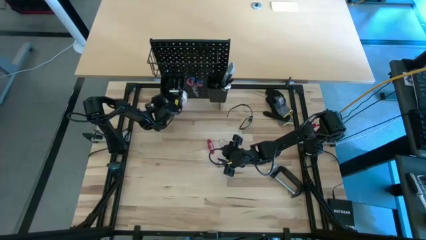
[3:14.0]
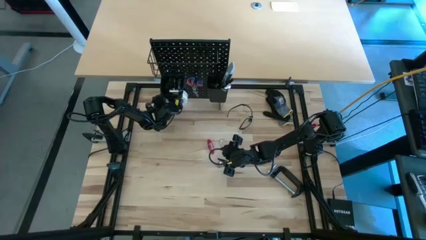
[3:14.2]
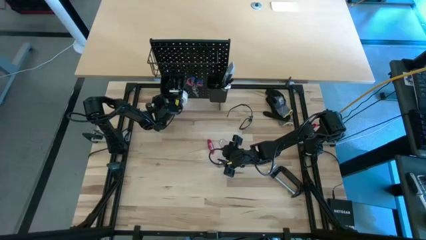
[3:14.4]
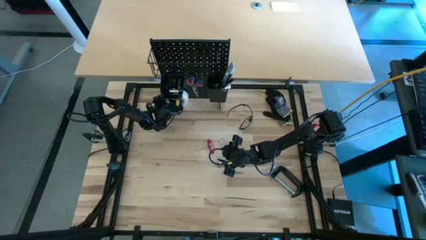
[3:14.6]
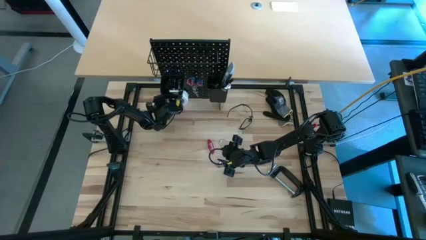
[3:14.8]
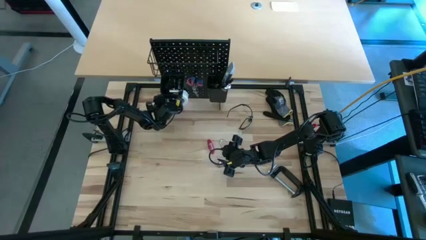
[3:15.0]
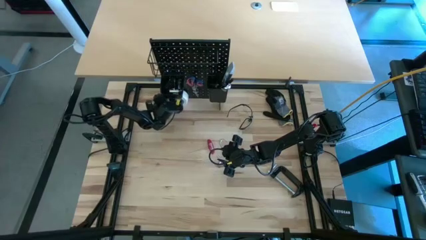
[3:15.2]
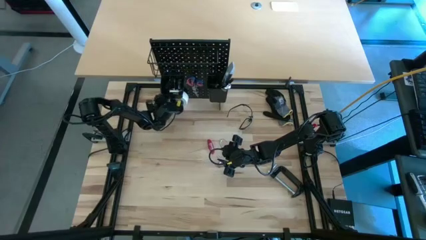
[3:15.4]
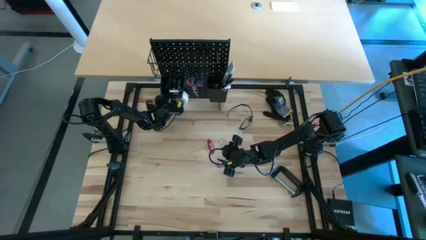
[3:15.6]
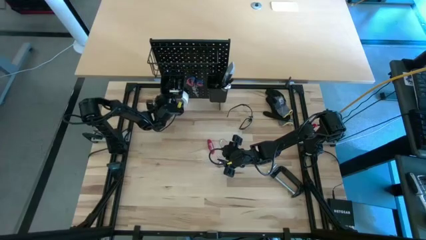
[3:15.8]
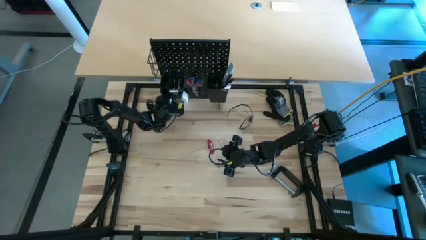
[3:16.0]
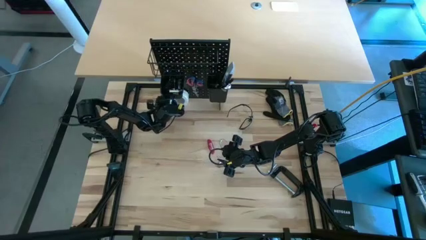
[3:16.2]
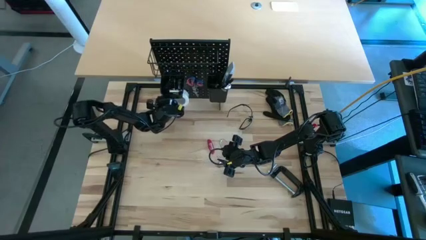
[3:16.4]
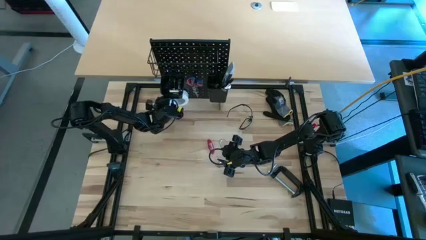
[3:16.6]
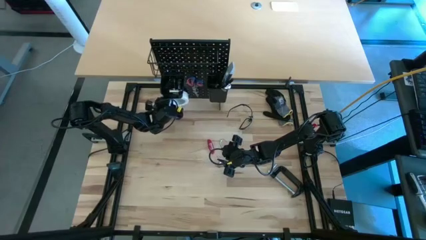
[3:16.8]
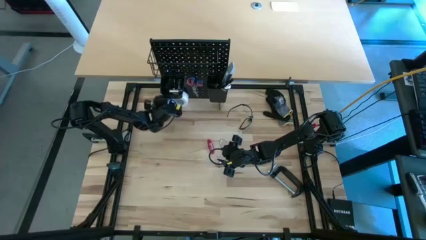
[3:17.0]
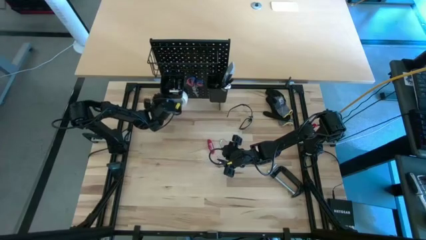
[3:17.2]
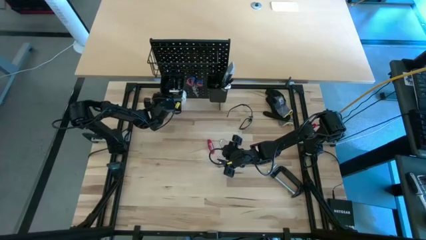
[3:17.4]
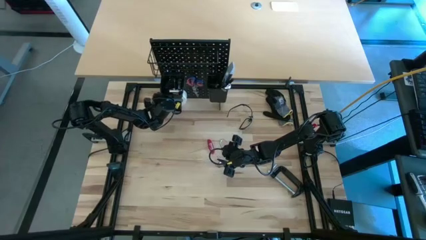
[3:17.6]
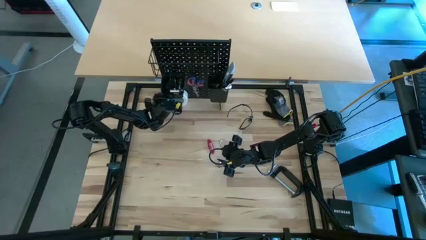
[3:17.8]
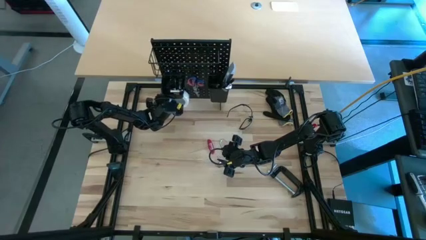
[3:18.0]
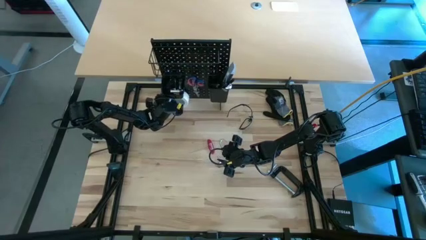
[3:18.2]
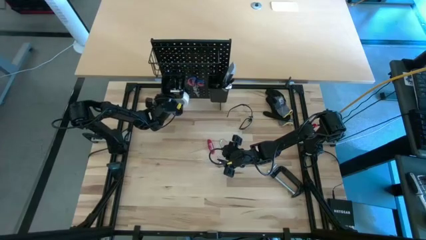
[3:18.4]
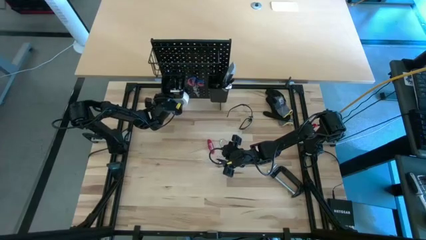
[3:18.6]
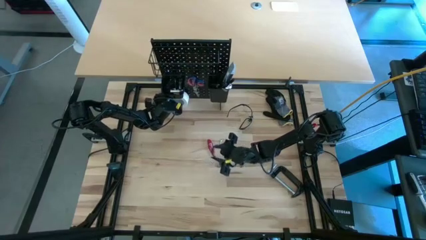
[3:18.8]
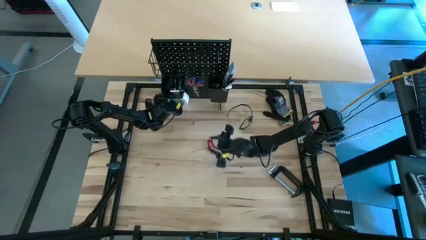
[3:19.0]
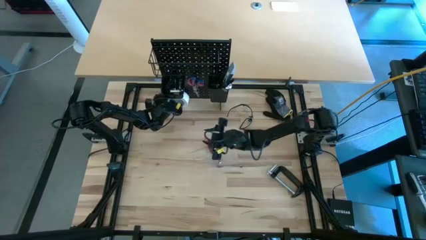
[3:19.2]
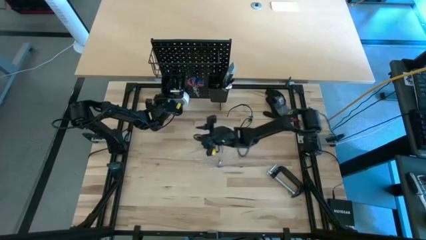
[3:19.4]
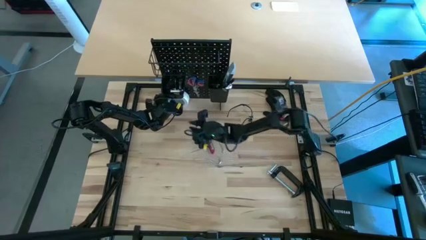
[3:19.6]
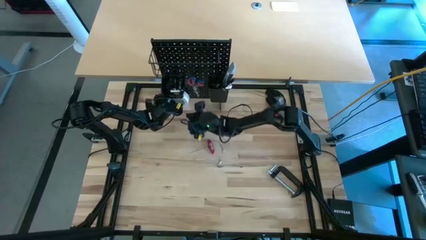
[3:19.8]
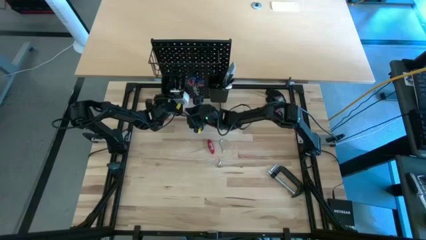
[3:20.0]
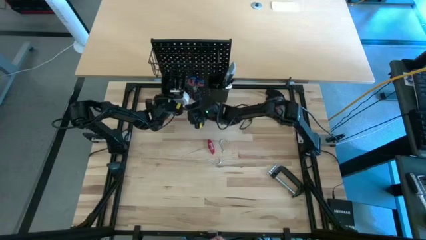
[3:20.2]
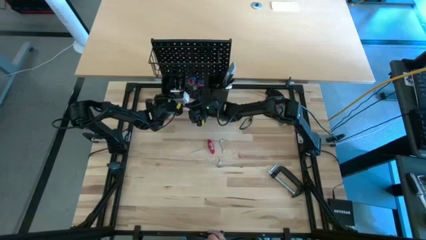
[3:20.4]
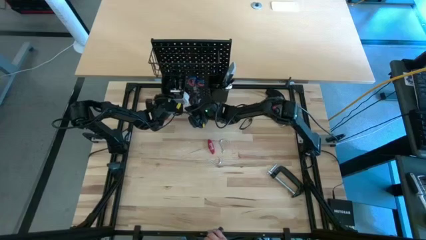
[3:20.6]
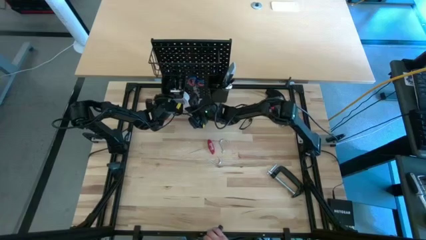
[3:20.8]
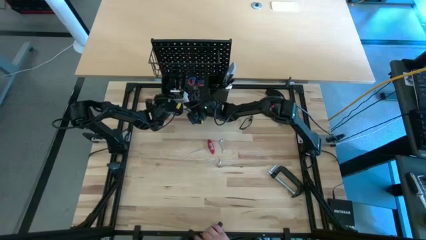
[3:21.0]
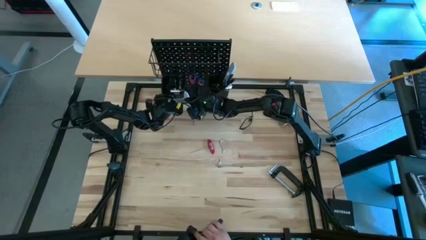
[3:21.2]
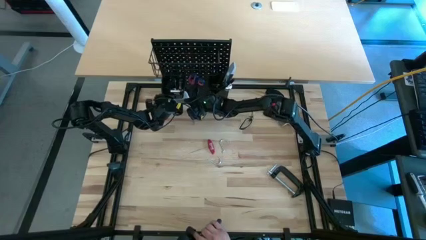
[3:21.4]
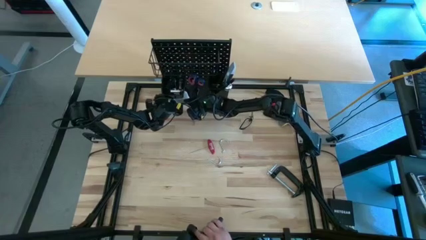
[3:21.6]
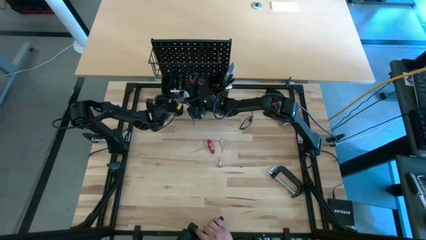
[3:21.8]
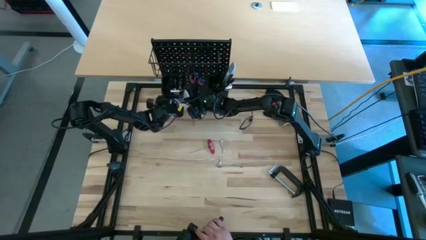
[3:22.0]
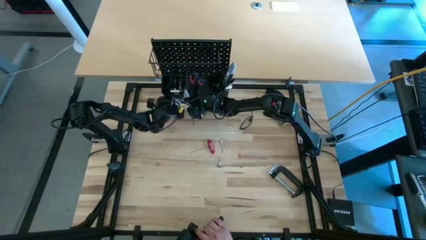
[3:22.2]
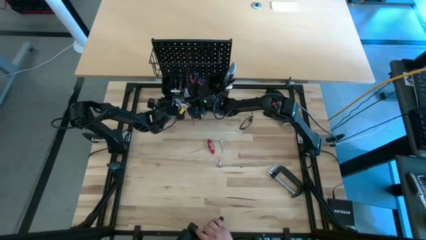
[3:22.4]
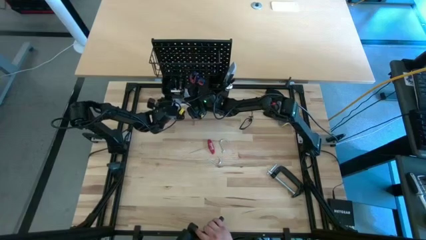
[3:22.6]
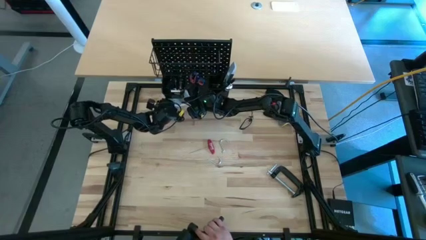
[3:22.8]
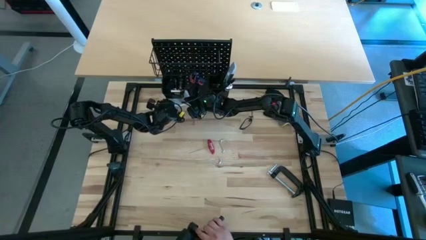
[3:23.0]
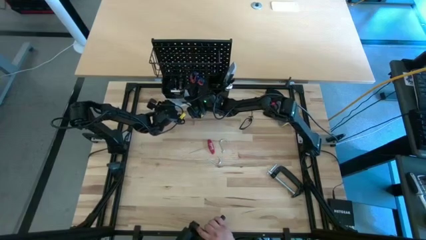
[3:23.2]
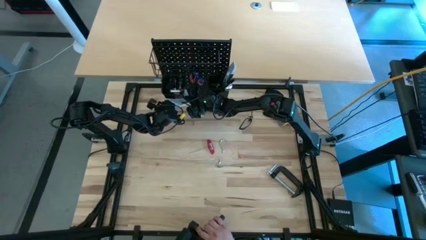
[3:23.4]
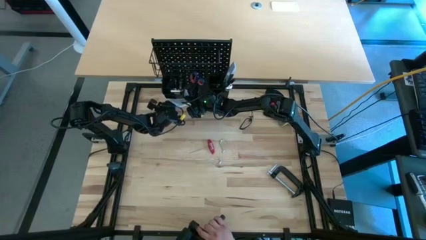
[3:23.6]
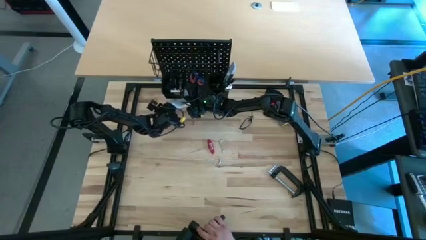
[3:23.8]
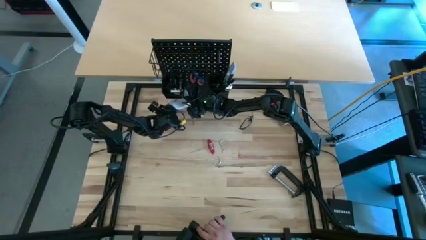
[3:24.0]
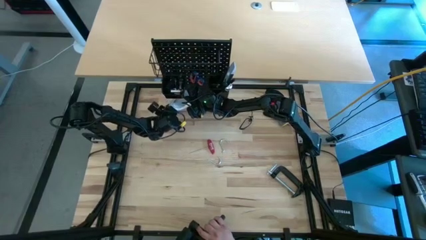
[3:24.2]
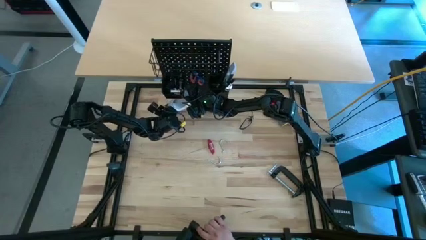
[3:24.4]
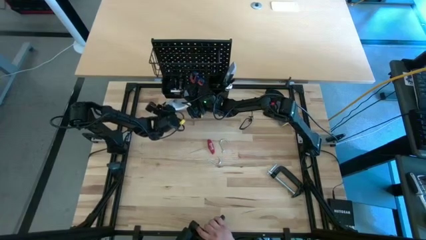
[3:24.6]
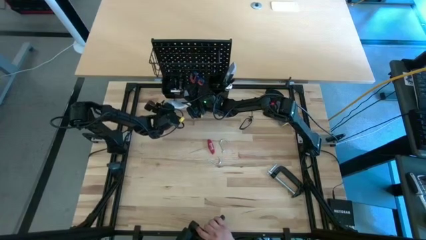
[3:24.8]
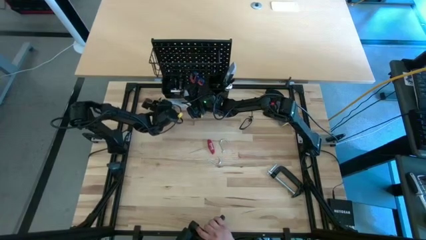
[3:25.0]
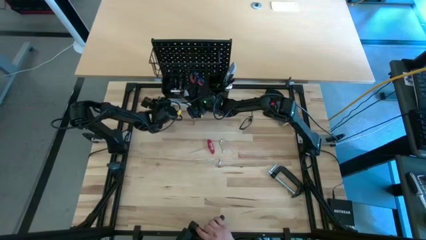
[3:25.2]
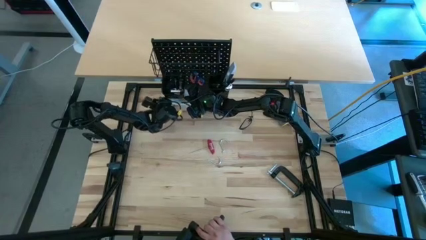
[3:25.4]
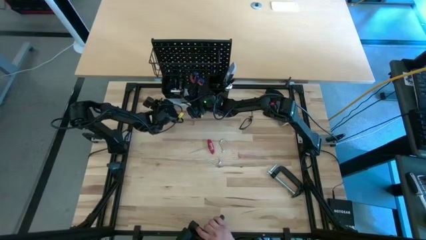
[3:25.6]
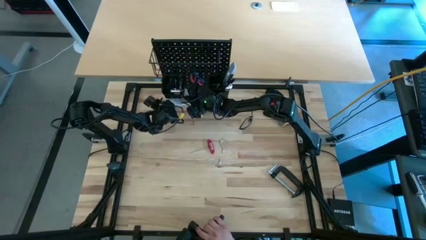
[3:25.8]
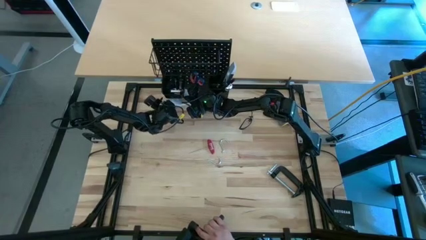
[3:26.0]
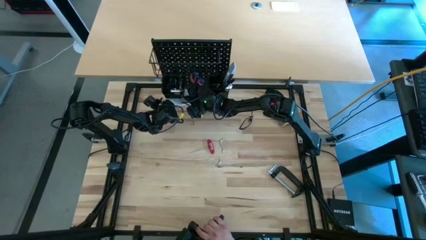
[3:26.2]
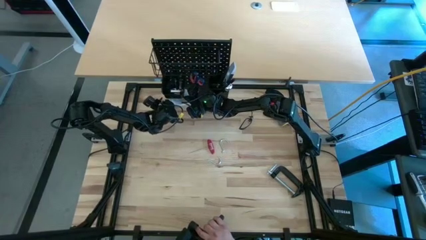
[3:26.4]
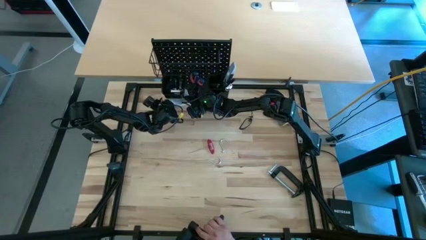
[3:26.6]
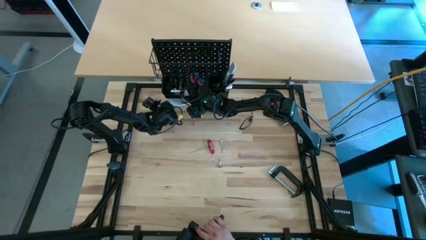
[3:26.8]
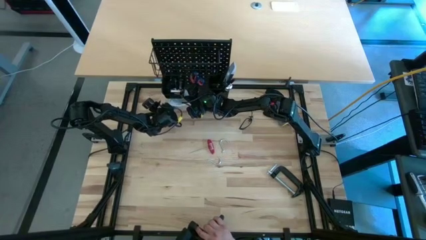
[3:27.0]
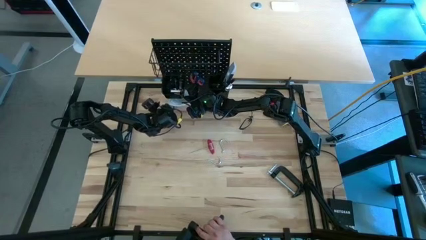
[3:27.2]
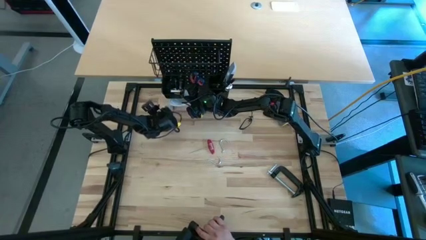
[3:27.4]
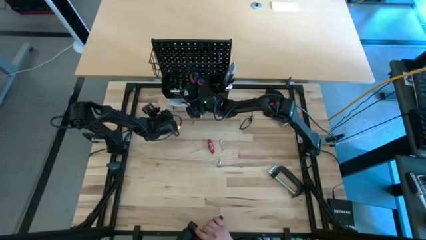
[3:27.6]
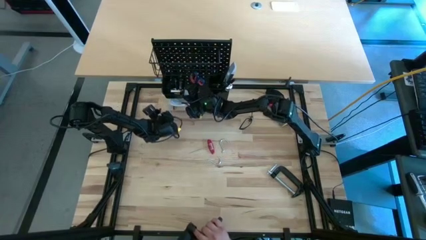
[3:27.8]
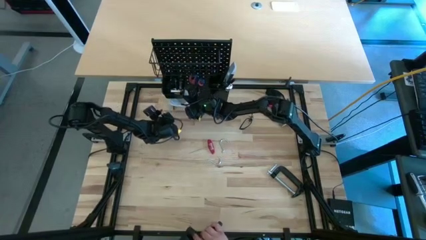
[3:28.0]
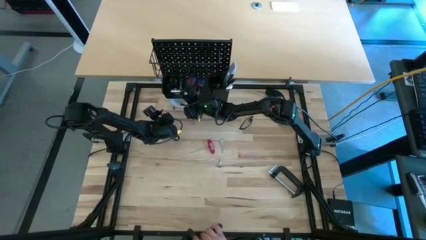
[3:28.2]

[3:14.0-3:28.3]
Task: Hang tools onto peg board
Hang the white masking tape on the pegboard hook

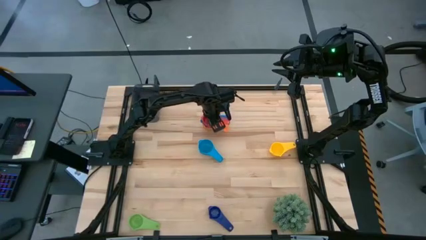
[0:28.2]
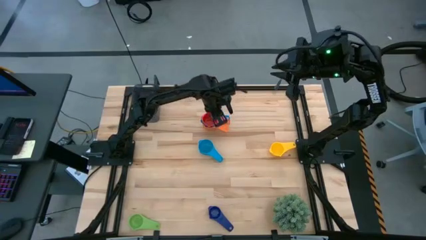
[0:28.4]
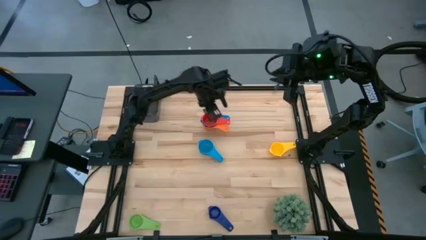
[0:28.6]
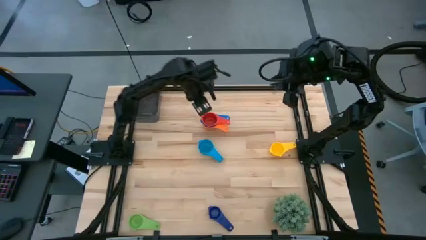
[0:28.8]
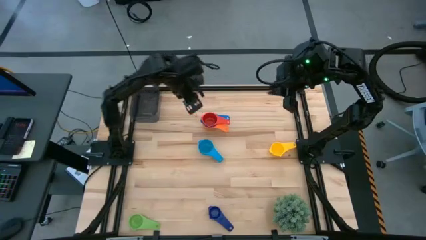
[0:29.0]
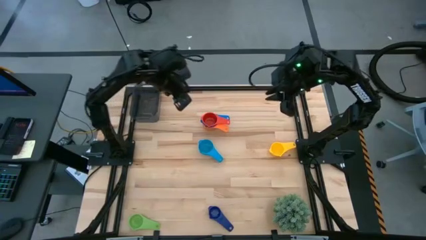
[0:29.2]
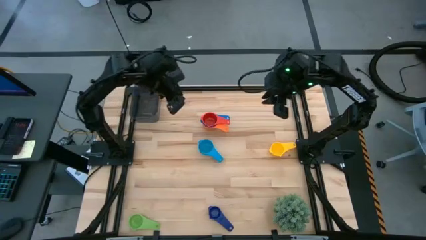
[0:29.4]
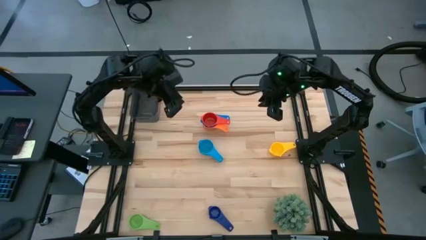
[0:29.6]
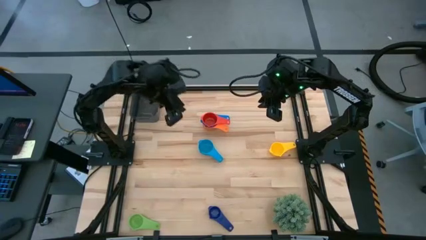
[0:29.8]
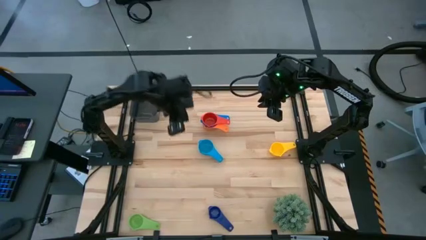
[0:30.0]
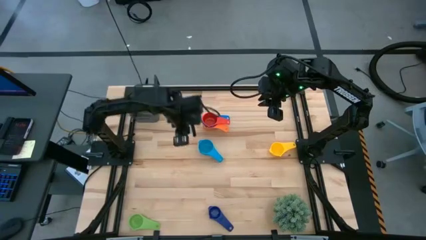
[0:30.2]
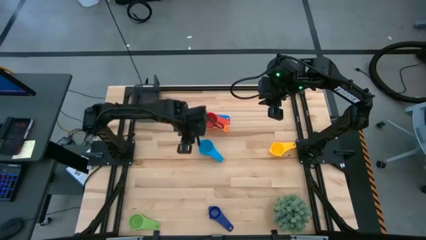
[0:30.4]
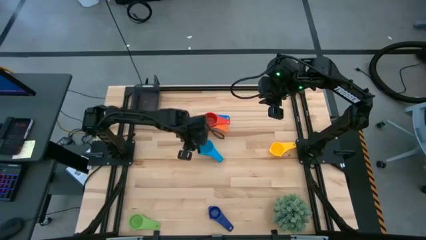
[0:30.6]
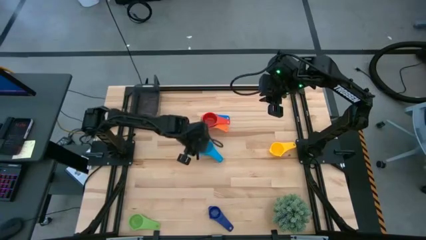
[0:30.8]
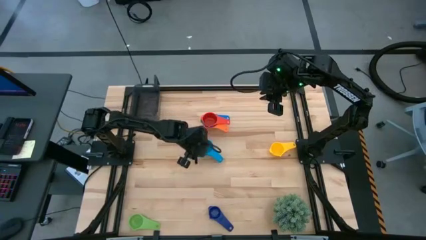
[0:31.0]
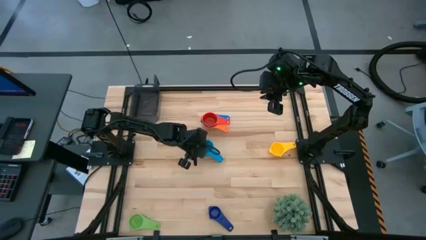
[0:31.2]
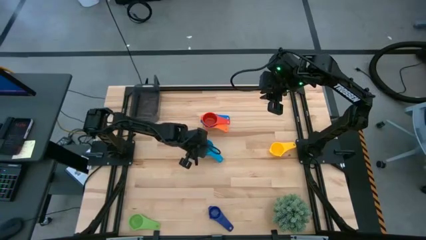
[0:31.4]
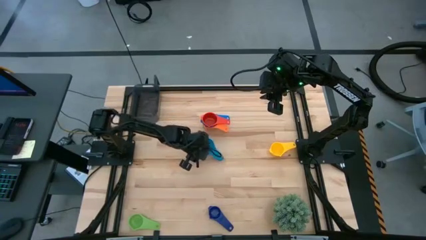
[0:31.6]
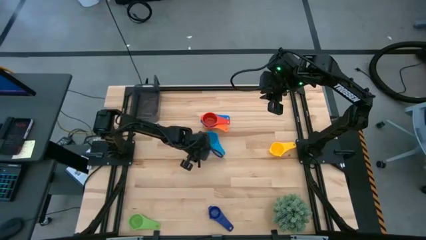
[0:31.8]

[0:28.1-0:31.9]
Task: Nest measuring cups in basket
Stack the light blue measuring cup on top of the red measuring cup
